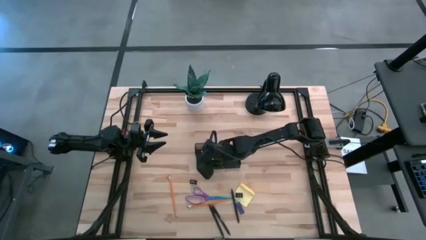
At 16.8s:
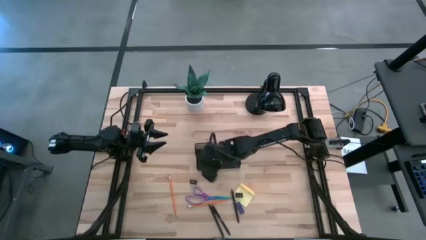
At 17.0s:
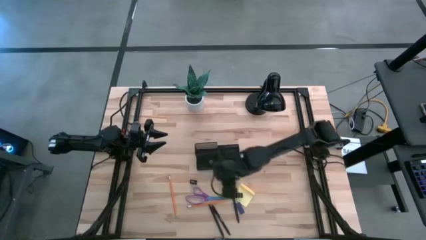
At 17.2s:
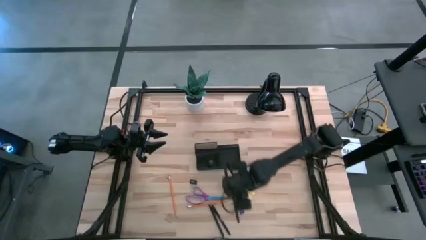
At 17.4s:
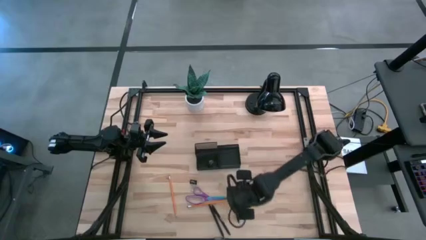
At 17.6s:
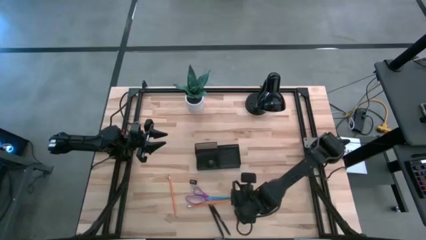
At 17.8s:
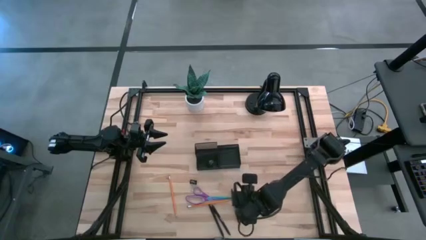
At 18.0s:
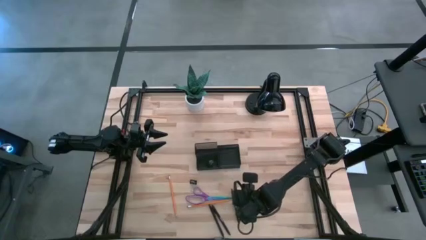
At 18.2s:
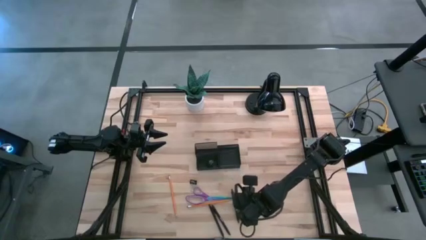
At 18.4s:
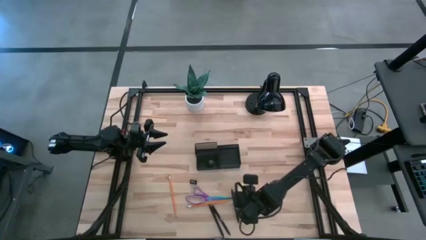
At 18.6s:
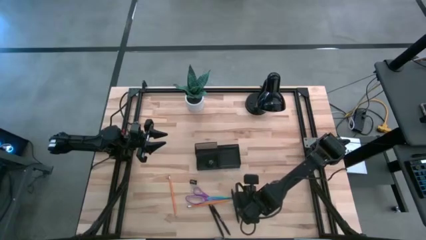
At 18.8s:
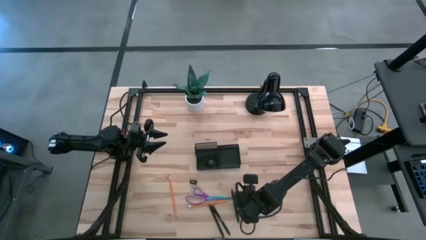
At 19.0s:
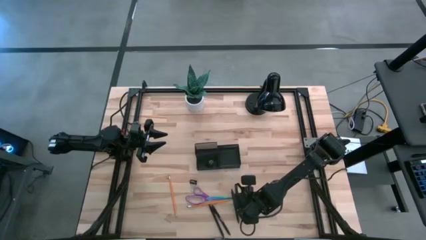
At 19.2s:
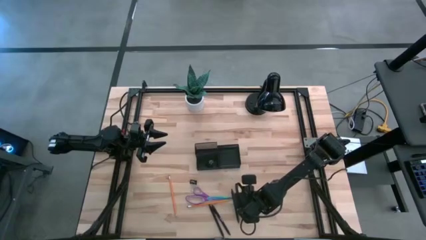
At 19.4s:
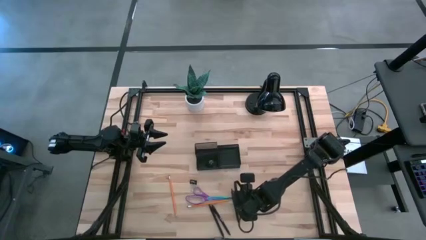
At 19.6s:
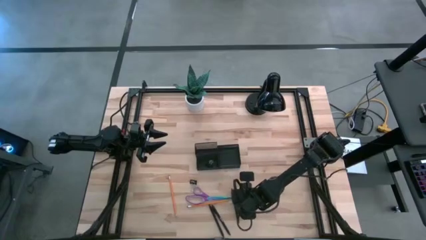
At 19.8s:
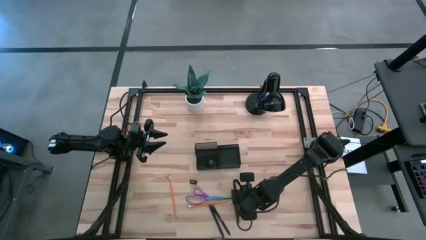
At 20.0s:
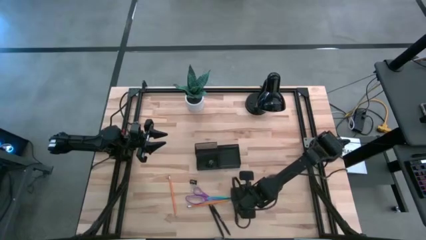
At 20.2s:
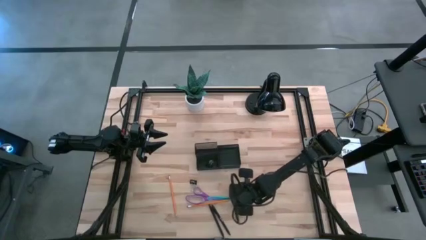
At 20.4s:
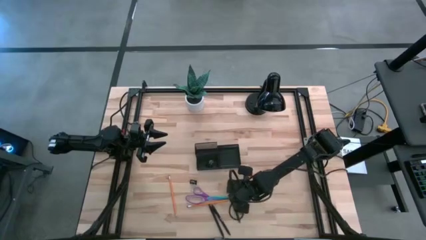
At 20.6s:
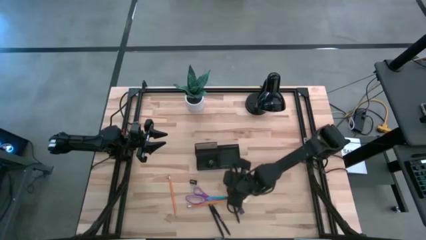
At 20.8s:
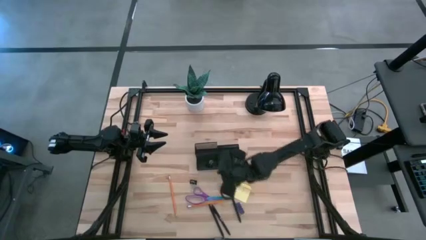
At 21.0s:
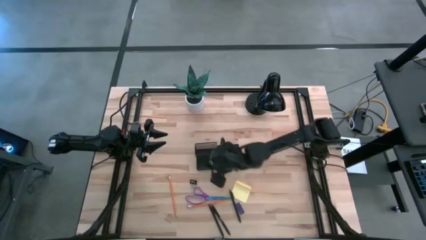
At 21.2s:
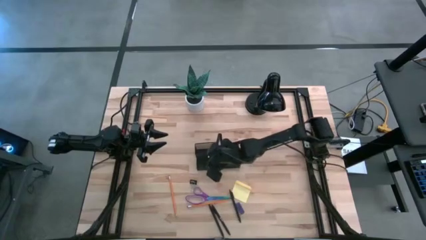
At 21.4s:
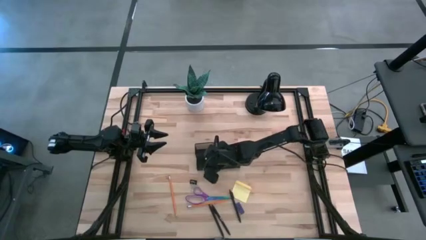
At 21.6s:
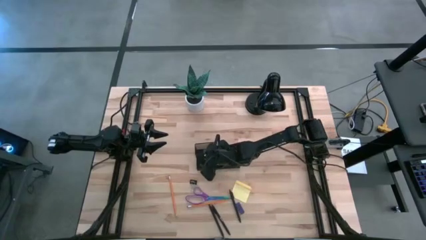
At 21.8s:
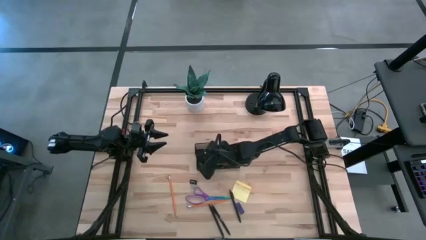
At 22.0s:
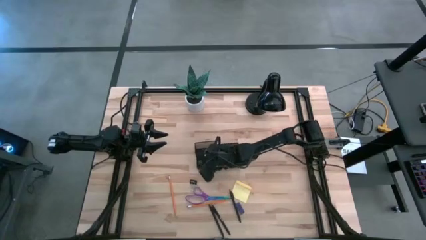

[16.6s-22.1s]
Task: Pick and place office supplies into organizer
Put the right binder clip into the desk organizer

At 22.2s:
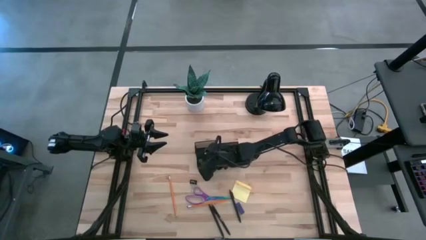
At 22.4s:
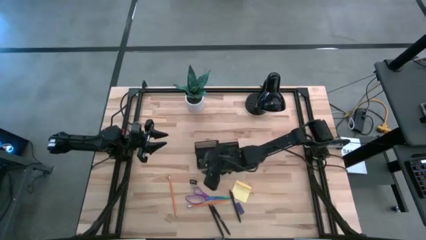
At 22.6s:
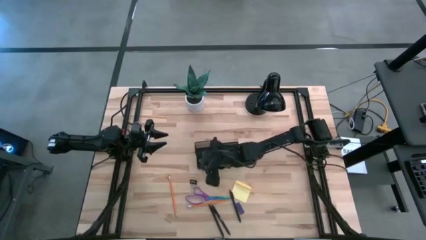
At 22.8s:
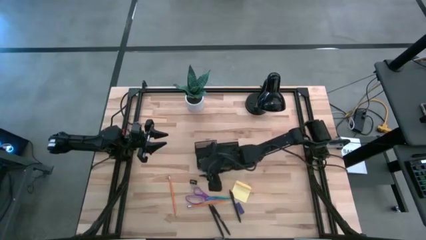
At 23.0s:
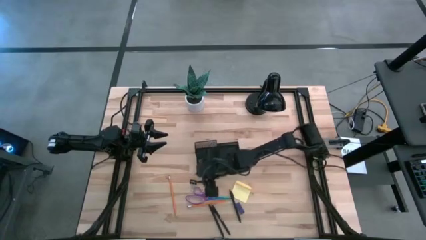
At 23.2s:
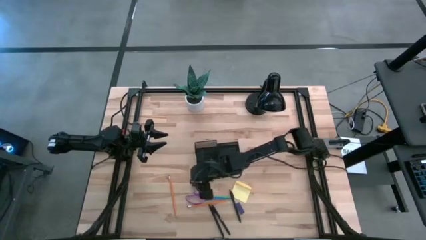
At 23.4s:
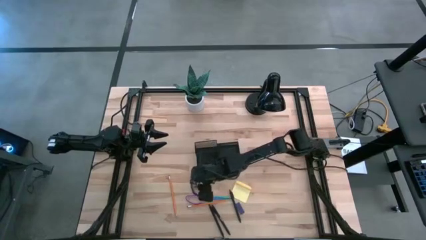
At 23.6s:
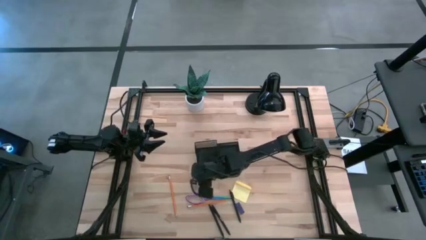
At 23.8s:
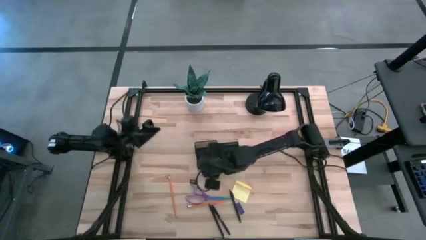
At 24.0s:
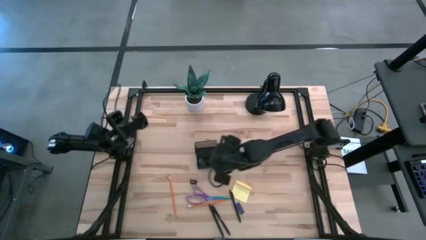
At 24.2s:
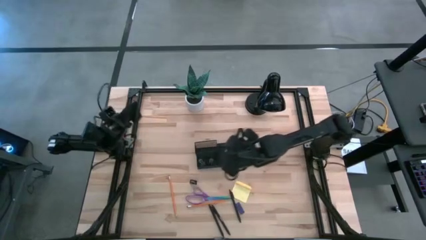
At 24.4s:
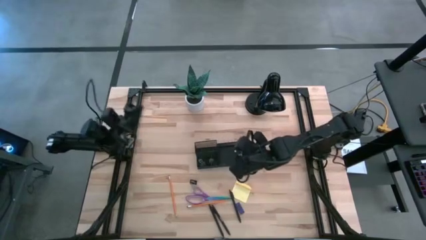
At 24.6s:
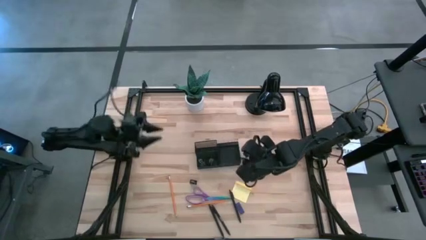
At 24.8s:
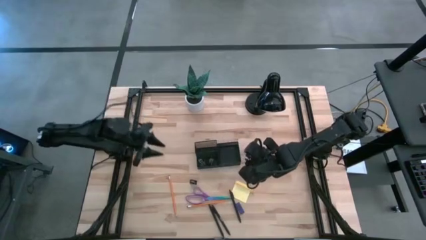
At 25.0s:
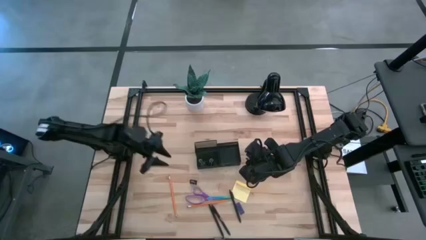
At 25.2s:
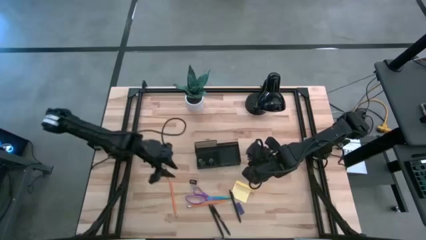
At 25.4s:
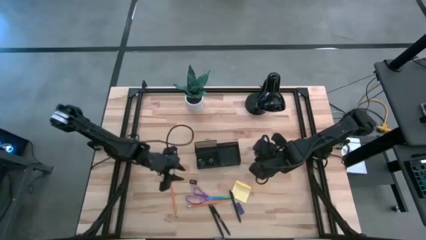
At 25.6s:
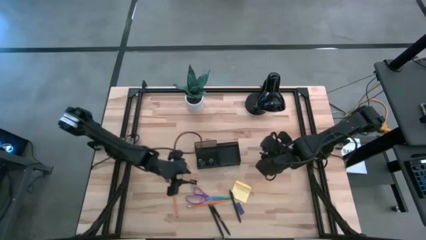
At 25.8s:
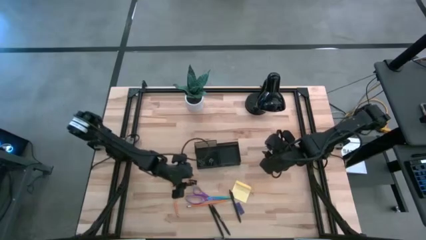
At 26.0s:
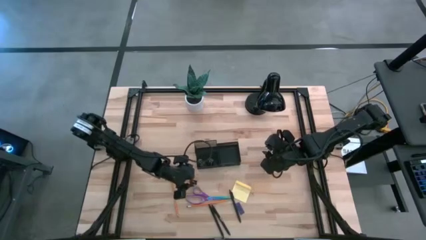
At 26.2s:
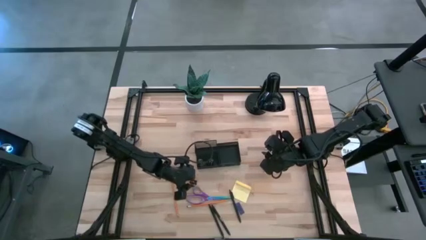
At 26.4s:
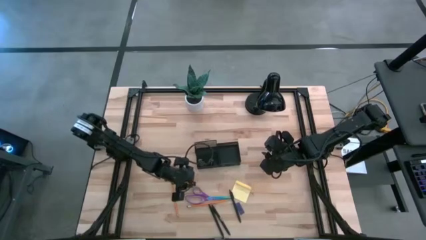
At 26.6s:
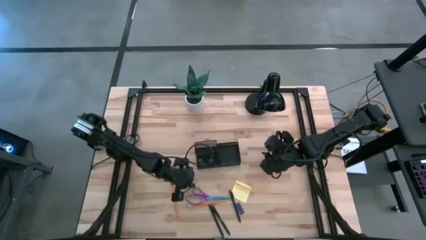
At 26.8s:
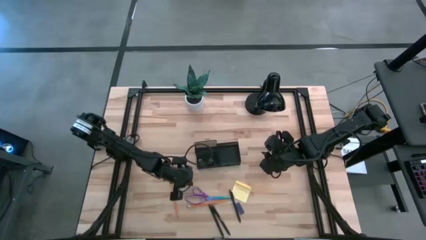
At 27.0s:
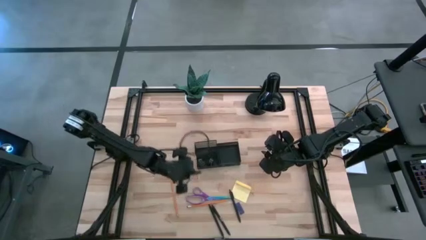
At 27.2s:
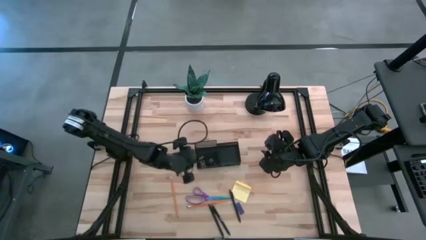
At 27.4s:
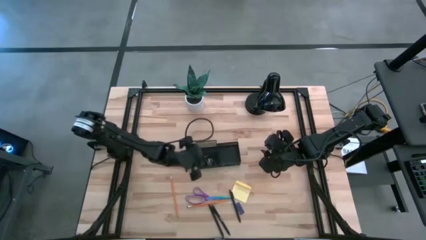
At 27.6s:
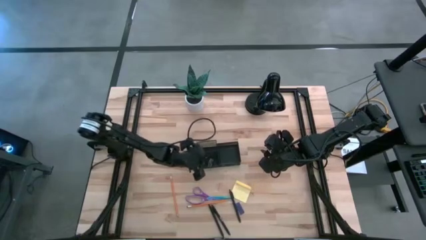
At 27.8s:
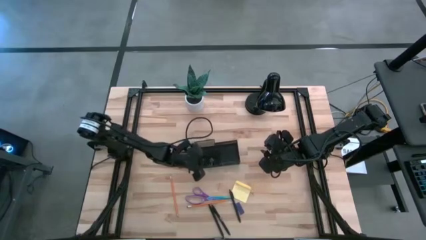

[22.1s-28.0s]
Put the binder clip into the desk organizer

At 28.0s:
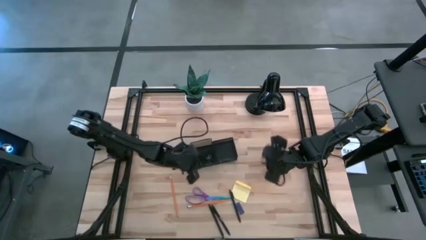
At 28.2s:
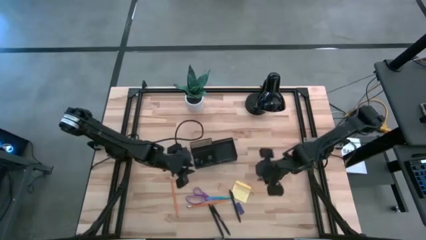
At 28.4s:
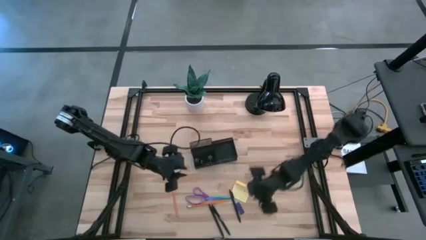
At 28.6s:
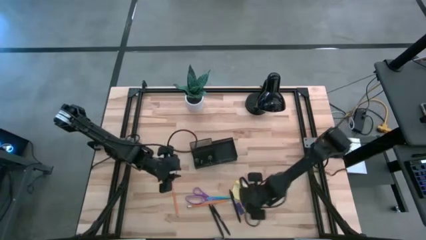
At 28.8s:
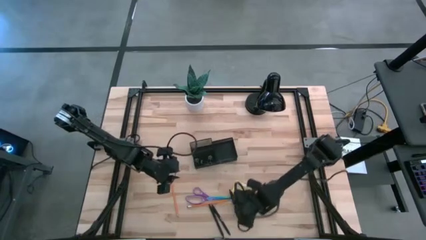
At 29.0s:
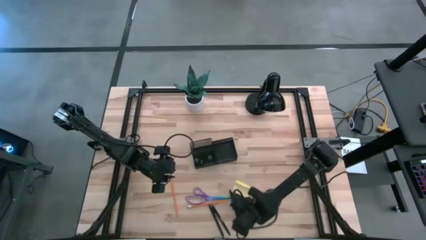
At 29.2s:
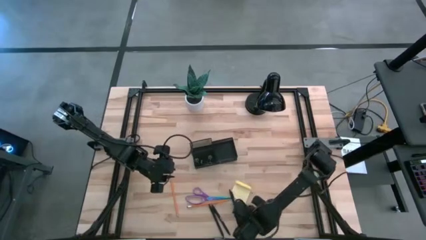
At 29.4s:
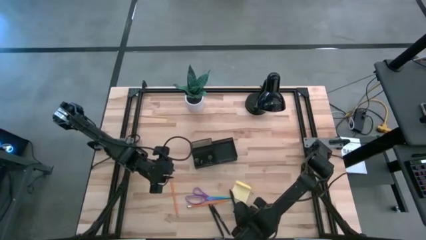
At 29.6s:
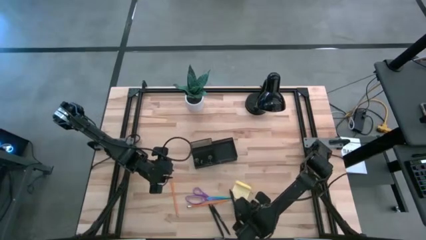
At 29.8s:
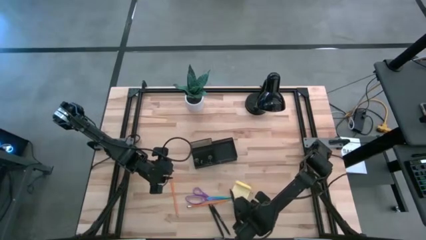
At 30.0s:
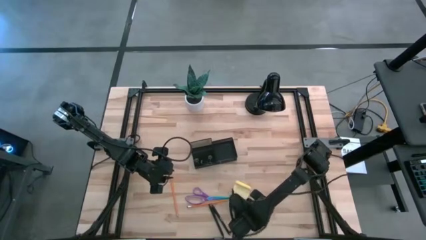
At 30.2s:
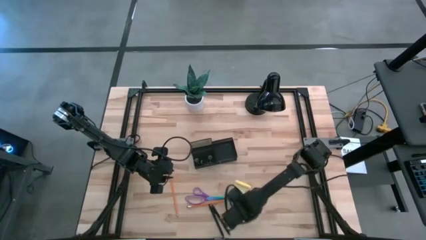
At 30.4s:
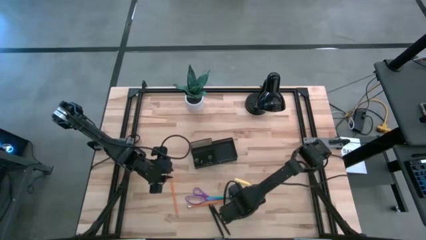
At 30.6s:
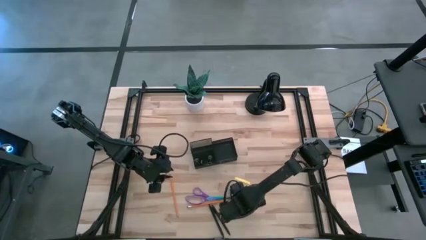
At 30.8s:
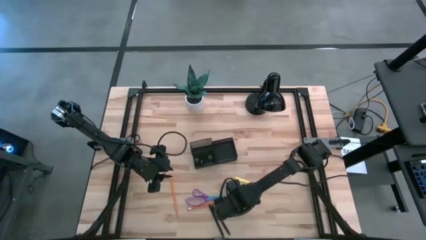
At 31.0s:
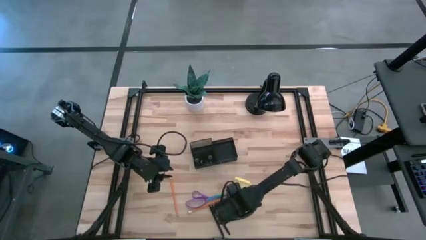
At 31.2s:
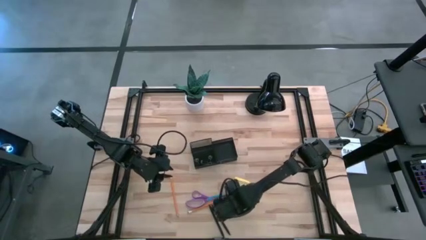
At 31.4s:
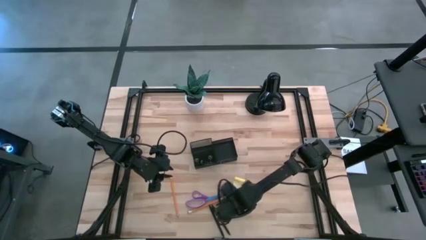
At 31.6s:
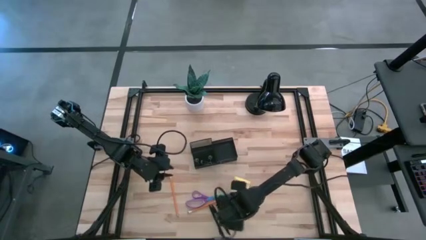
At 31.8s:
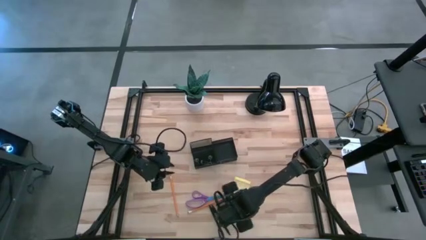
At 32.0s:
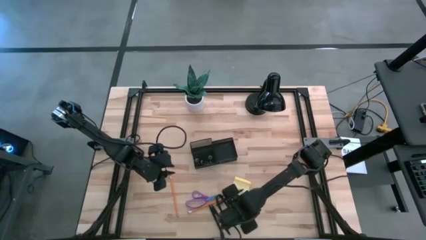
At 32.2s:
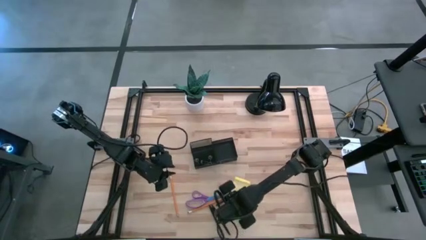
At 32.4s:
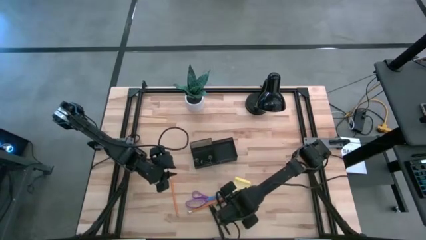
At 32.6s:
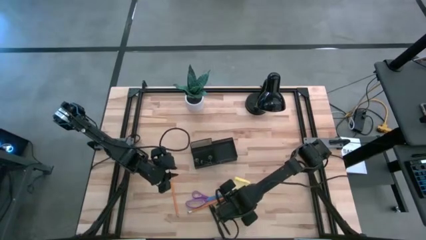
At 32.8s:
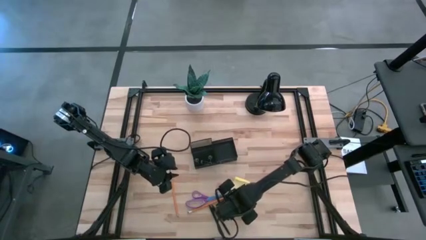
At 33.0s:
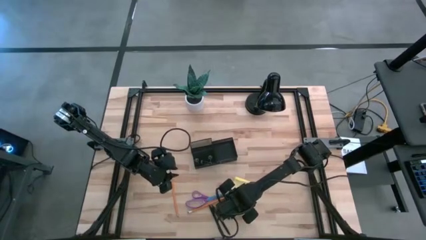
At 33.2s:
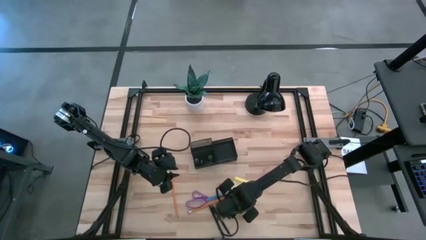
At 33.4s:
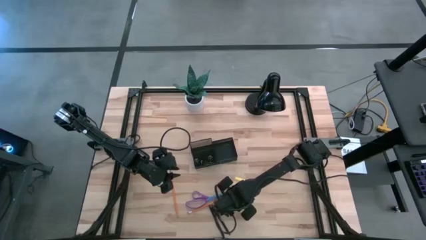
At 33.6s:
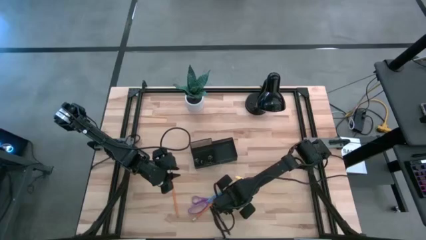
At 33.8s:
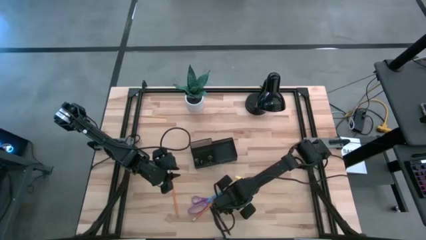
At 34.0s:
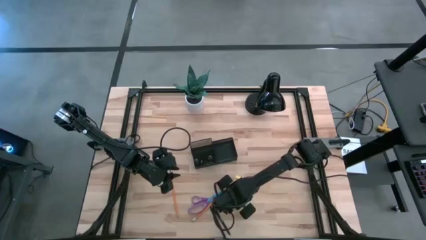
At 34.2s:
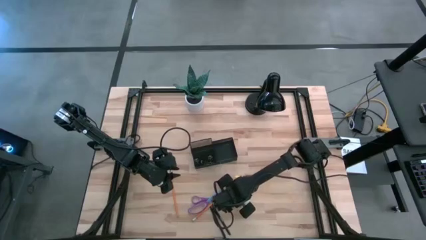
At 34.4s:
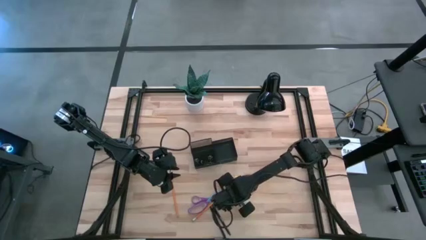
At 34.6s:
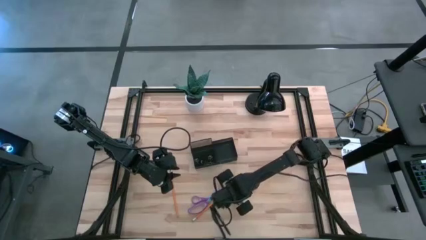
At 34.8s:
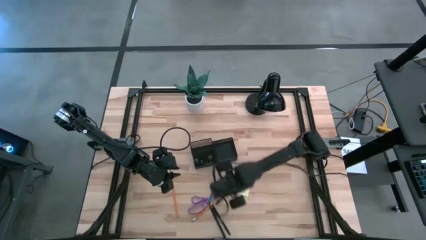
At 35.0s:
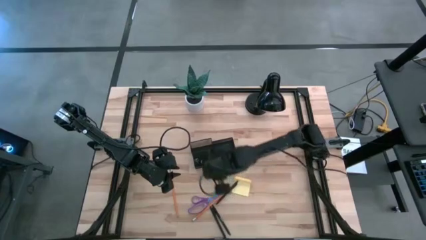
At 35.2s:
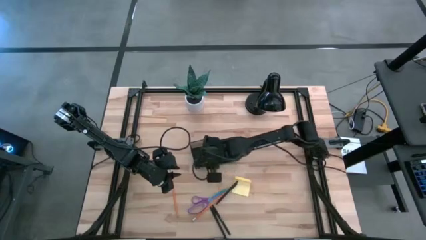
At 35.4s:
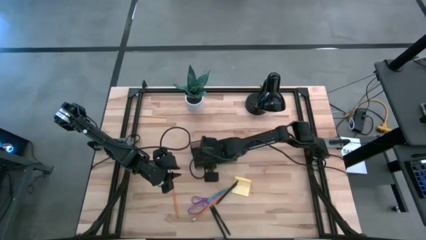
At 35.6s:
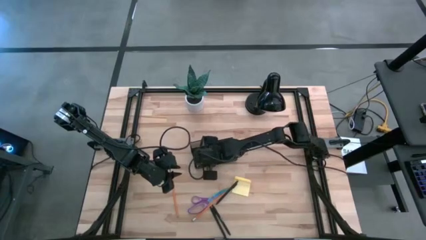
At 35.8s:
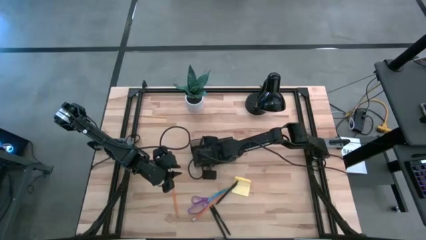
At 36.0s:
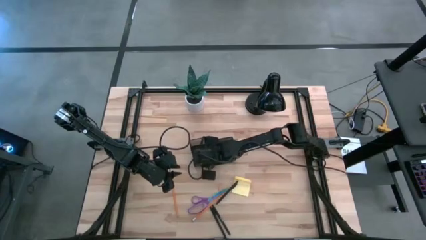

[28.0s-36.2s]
Put the eraser into the desk organizer
